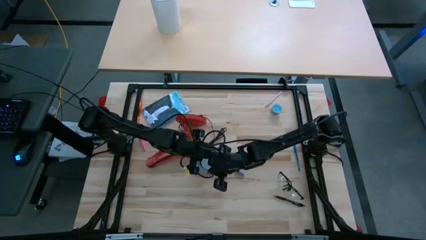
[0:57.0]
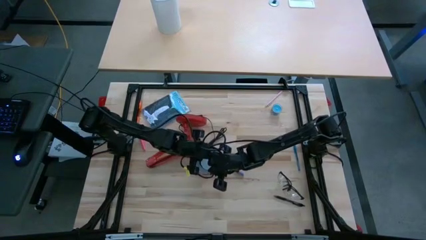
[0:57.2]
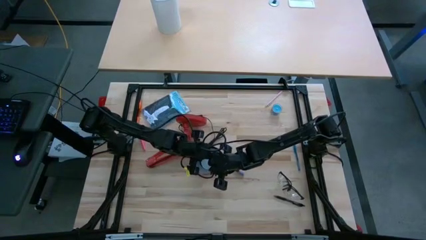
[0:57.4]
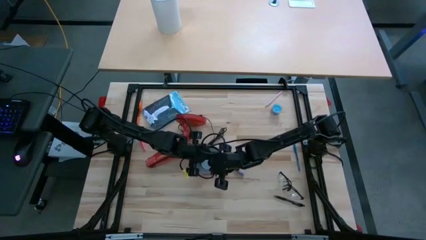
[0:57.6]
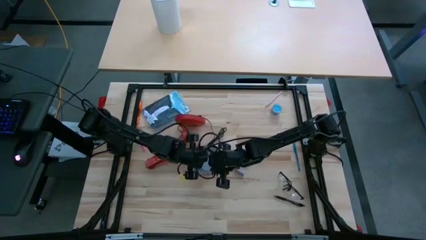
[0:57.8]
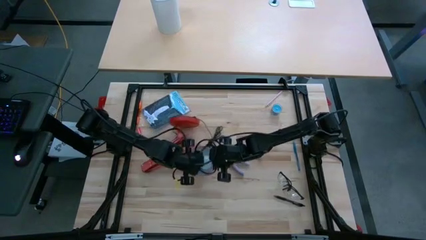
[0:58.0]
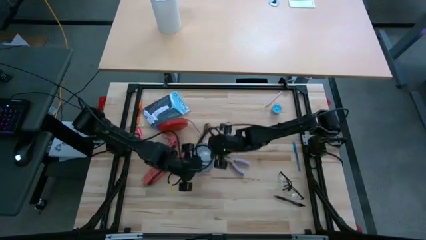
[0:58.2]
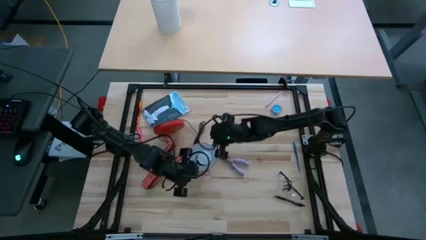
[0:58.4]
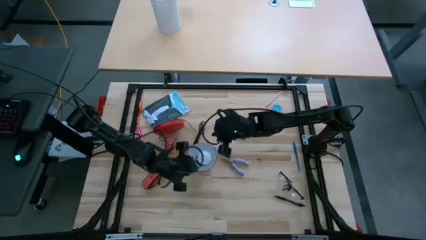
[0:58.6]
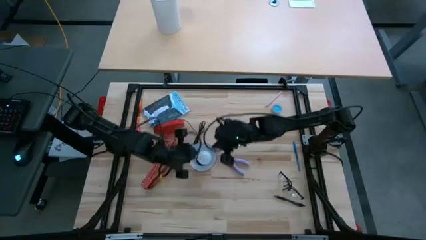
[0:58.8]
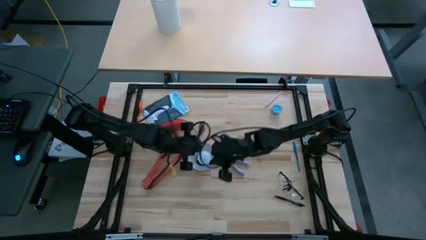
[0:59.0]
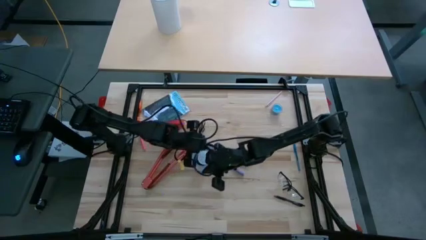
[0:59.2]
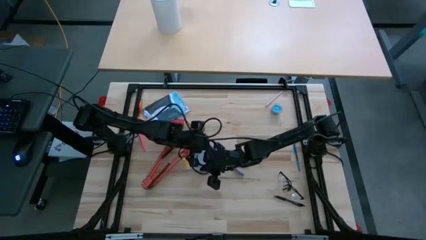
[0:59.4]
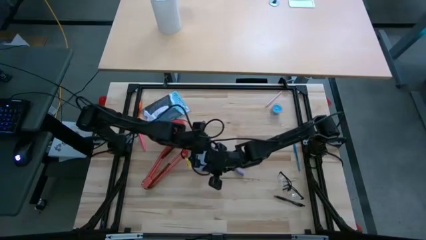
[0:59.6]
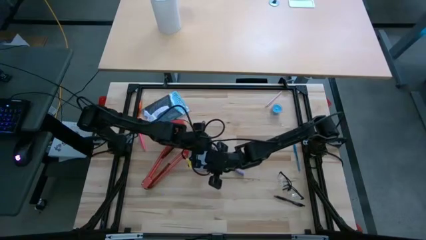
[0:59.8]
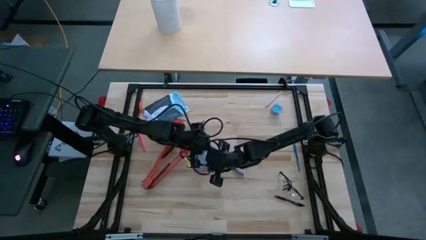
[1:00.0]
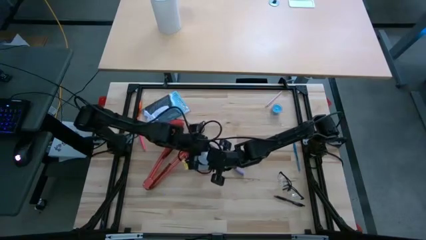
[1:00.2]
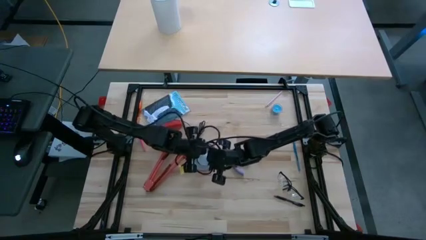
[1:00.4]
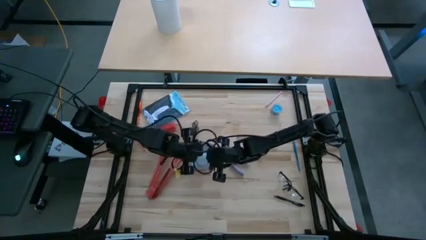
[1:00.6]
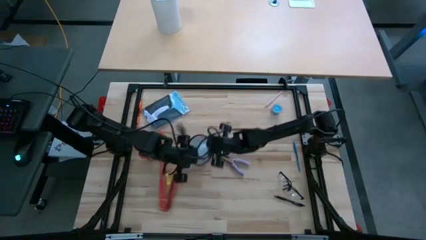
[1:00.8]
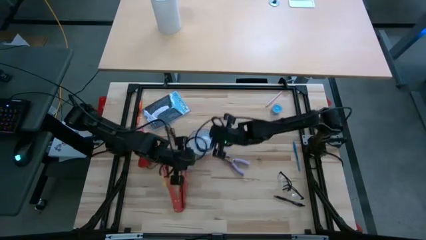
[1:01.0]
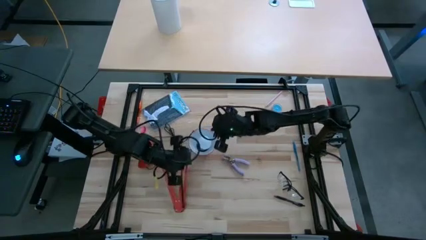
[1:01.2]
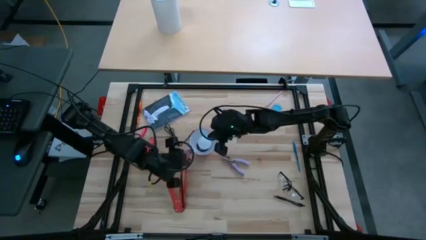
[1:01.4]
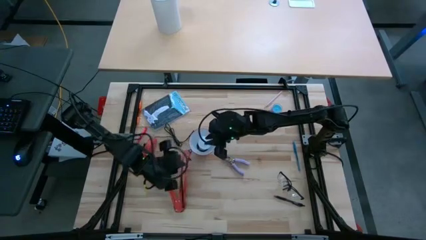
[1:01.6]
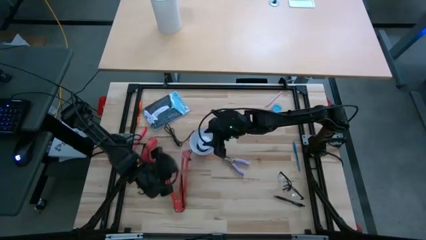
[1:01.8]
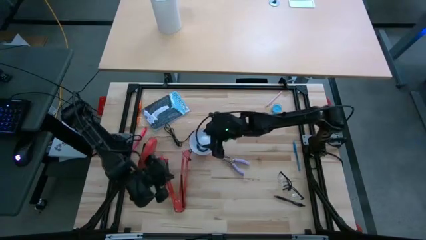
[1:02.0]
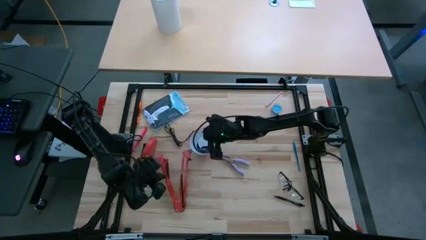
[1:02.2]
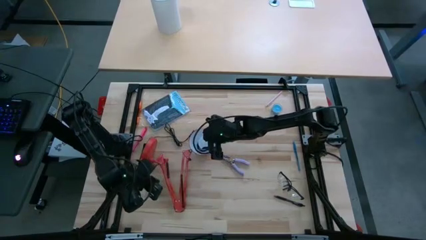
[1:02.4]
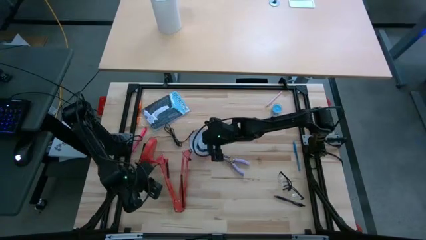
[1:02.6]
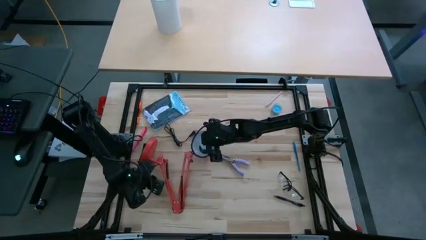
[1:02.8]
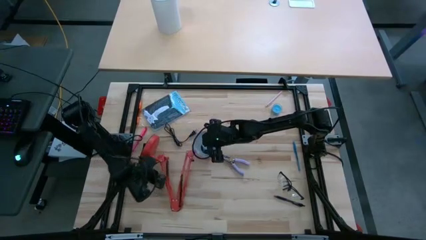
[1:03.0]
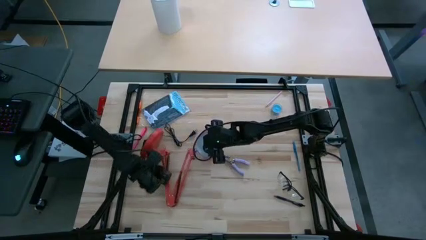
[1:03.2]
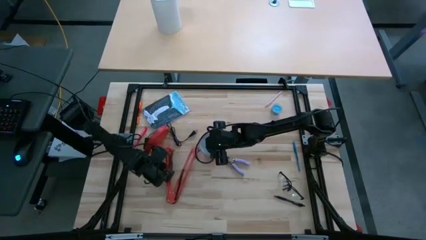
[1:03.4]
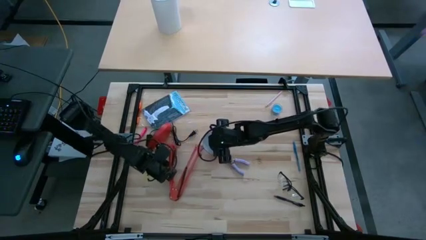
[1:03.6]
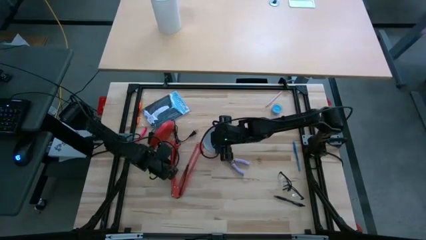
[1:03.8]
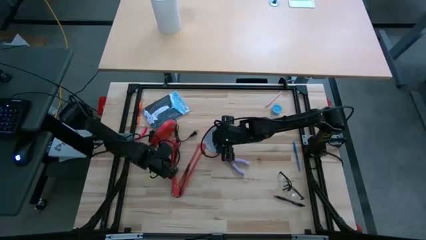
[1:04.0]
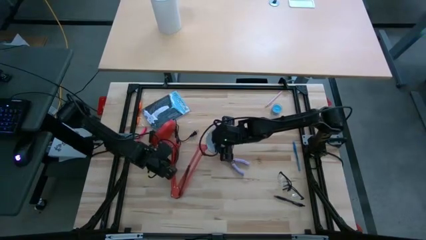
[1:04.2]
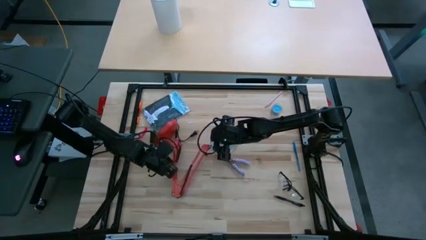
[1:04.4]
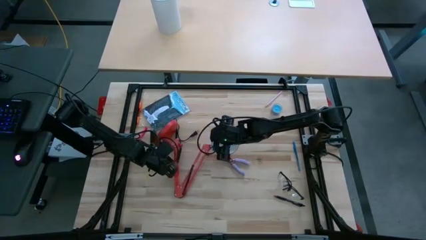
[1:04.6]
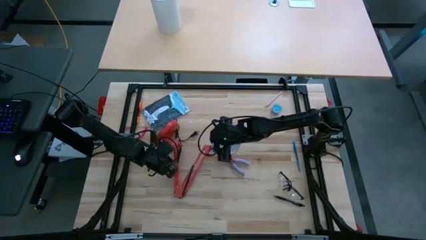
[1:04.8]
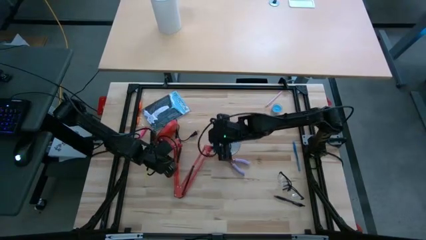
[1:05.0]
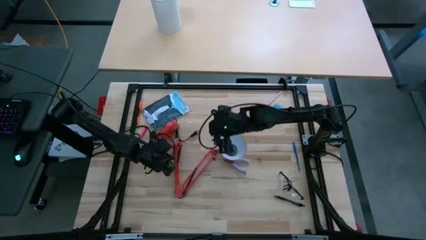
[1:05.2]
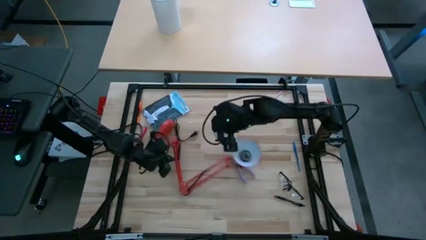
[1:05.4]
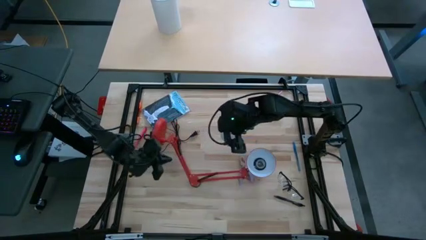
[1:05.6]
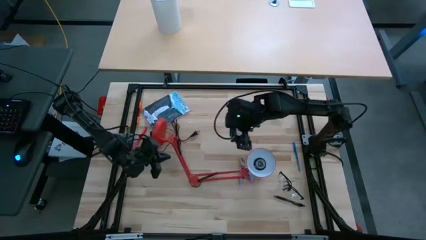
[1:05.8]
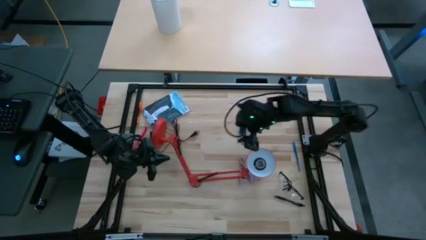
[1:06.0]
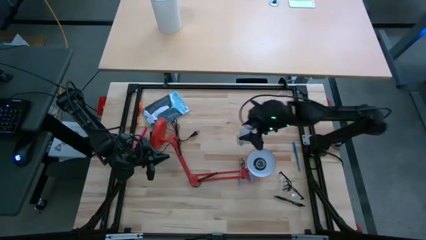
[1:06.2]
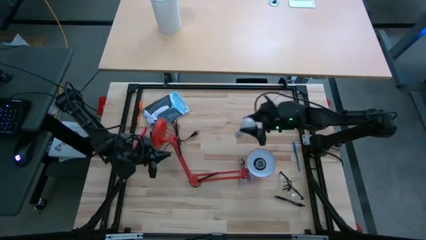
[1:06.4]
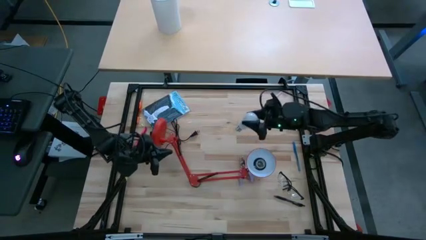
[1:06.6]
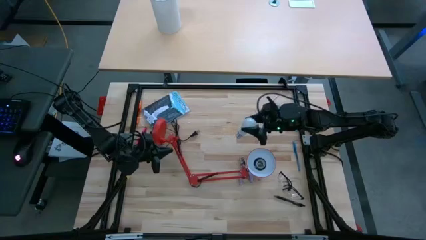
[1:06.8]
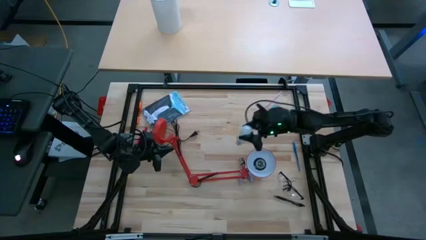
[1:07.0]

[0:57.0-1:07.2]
Task: Screw lightbulb
Remove the lightbulb from the red desk lamp

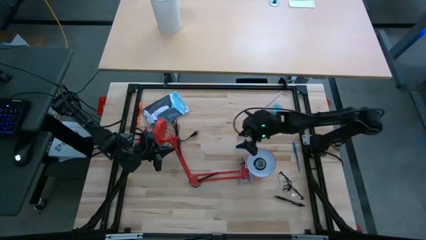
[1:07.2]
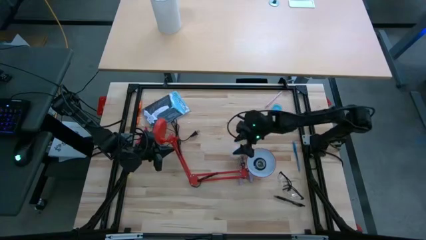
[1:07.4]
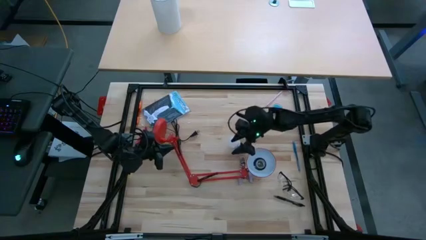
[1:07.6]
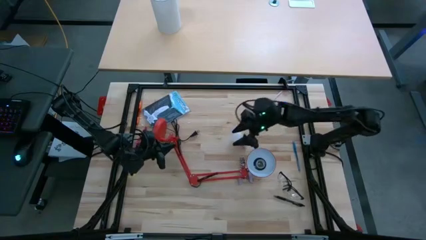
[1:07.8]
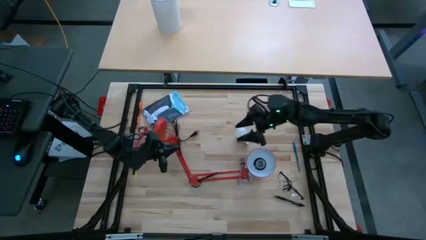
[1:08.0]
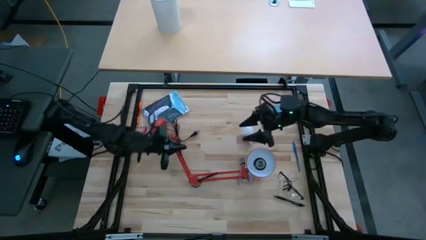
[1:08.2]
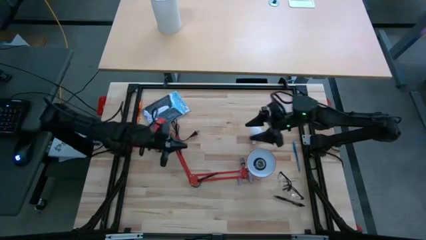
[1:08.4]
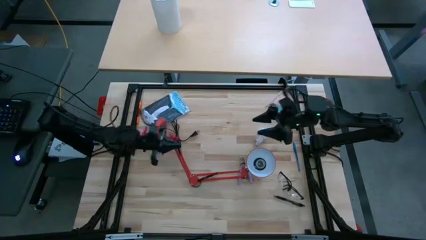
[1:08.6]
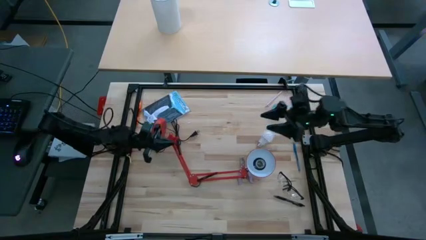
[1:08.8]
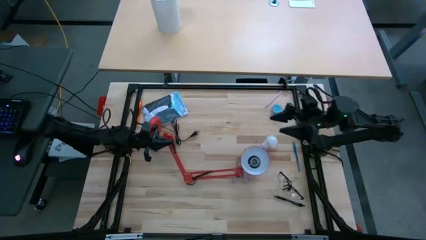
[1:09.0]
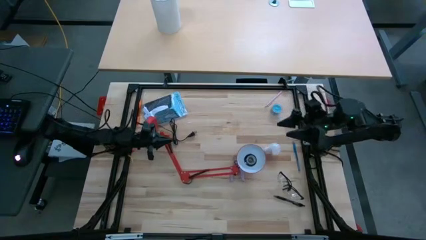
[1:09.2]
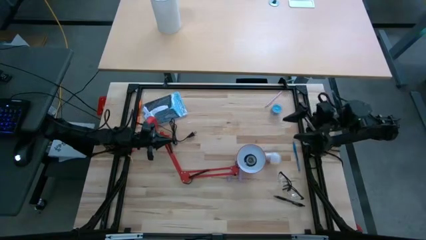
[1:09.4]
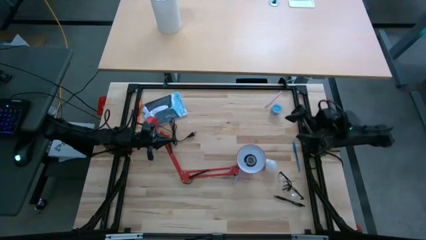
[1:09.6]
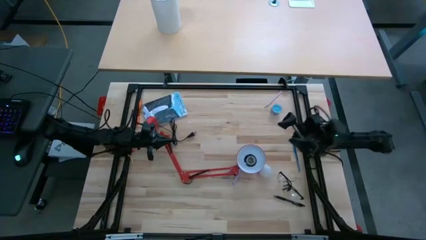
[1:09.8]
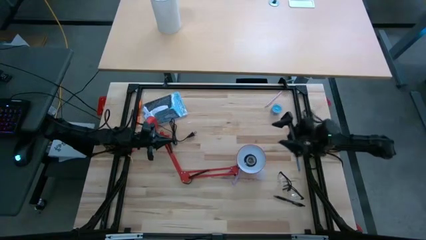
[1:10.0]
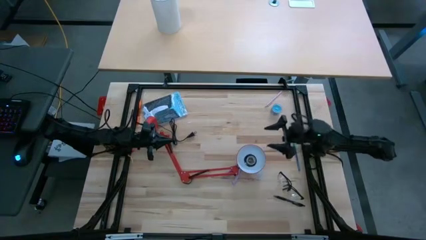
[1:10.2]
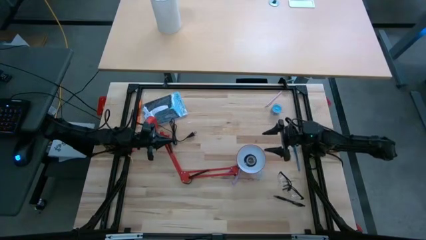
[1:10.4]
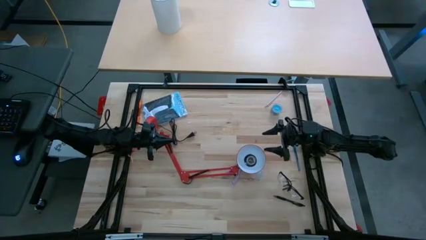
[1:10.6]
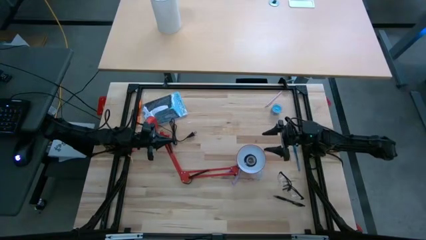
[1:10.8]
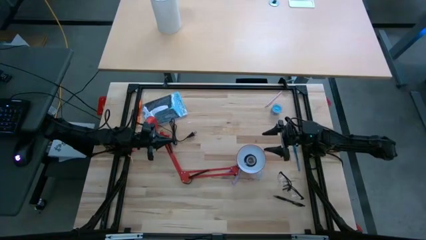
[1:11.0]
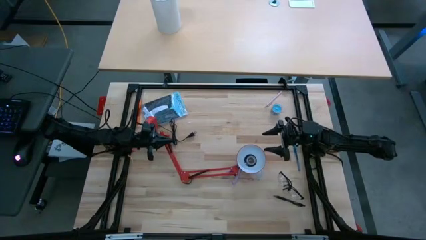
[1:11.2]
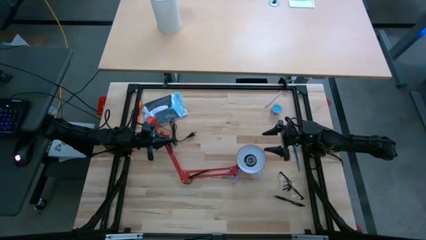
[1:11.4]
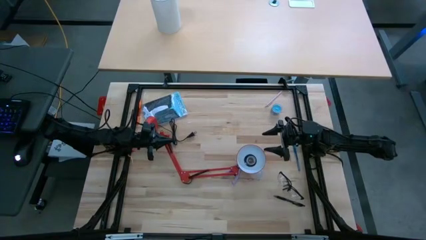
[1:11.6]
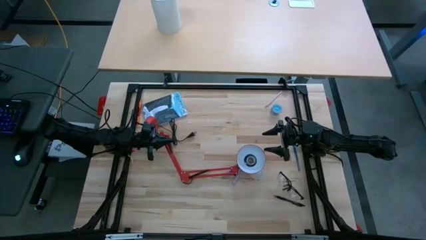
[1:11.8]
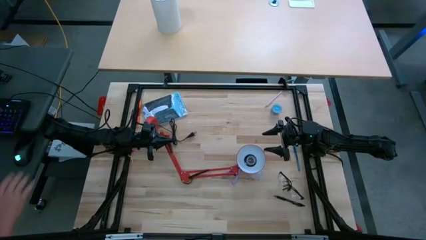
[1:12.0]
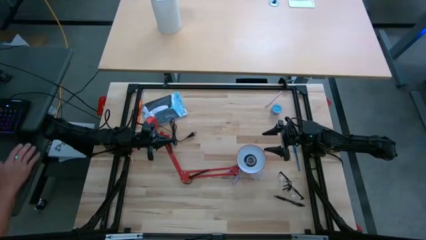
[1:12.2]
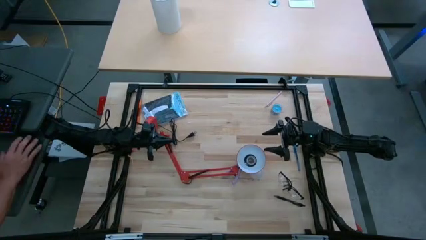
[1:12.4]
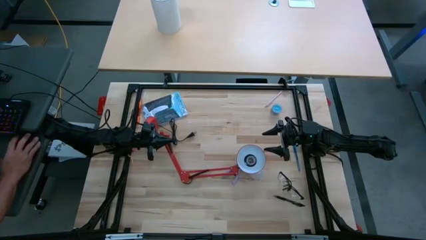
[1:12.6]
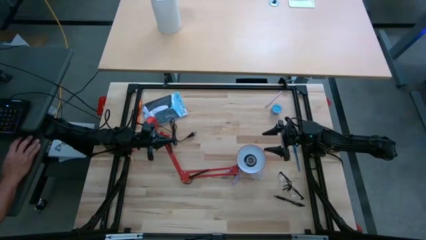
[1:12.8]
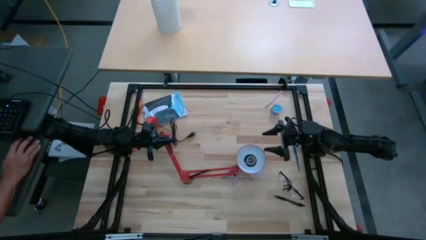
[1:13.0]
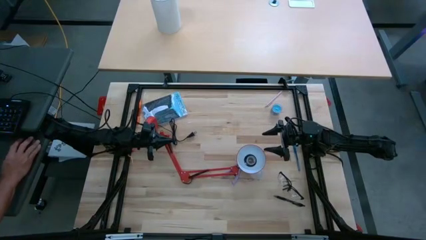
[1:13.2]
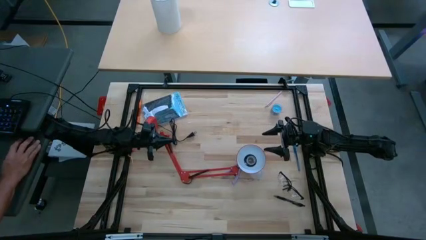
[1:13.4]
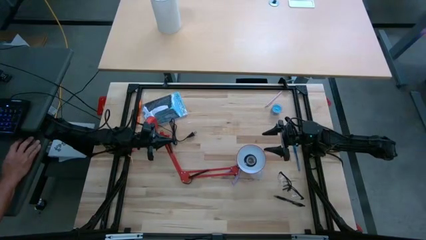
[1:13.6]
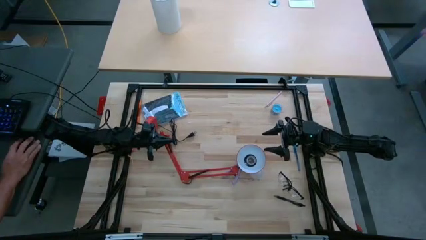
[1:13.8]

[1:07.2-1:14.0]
Return to home position
